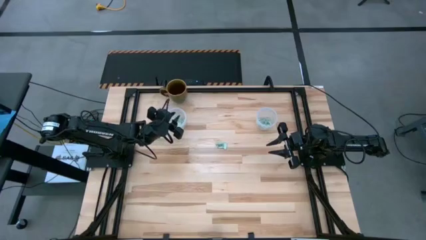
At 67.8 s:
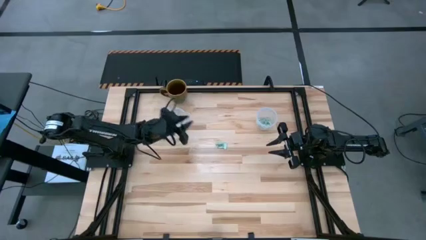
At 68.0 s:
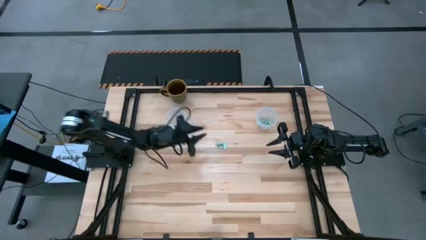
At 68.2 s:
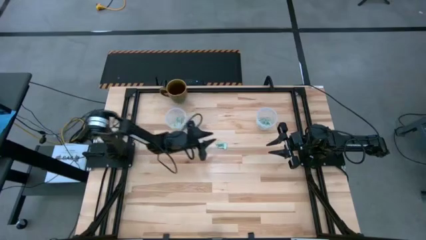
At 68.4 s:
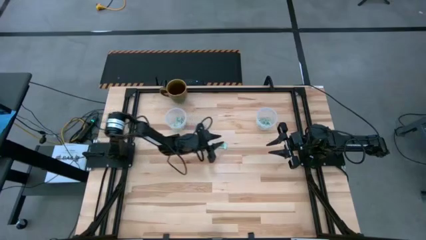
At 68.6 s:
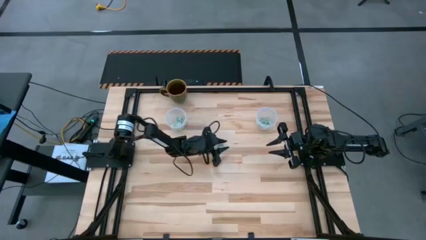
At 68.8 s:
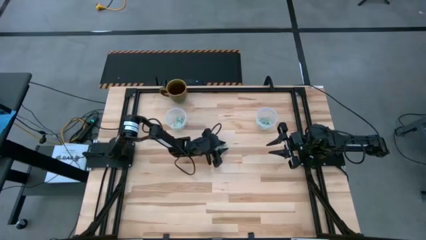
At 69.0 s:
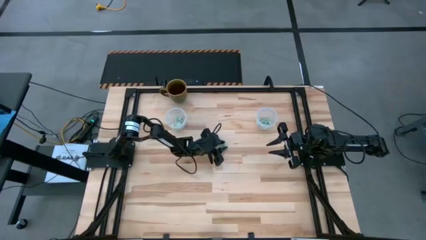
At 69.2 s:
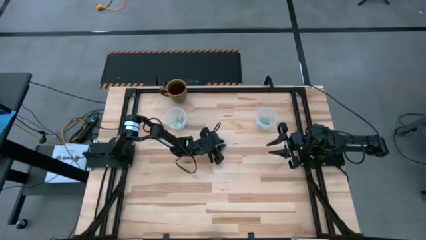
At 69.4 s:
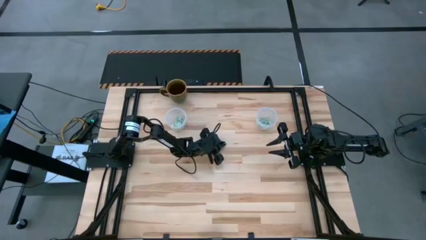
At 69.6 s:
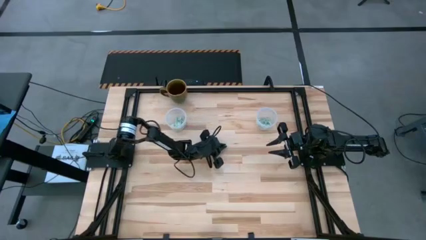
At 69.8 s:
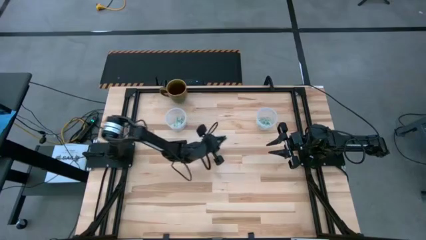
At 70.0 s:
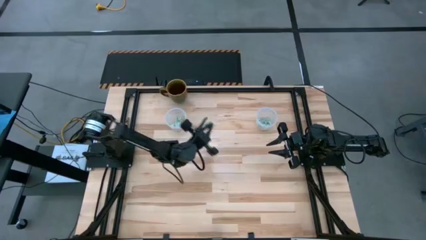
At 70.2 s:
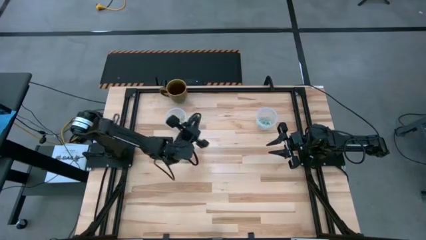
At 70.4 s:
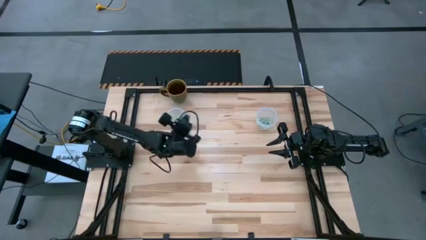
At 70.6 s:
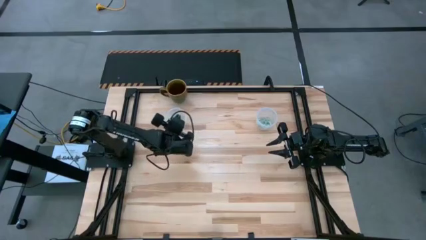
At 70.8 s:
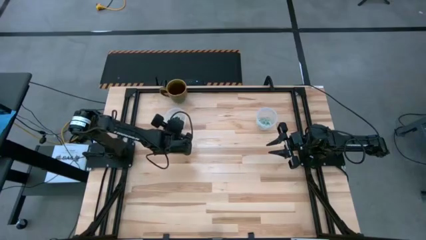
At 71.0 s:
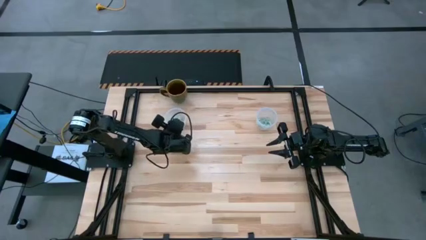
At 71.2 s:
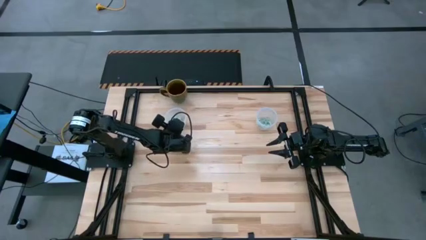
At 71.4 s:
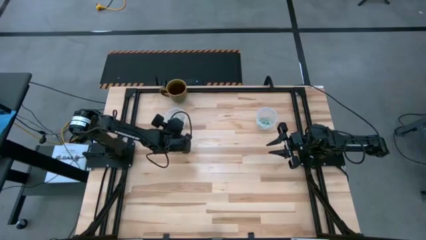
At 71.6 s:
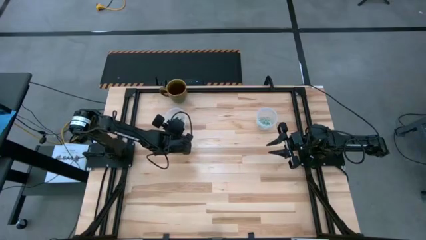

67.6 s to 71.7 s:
Task: Pick and place items into bin
Put the stevia packet into the left transparent bin

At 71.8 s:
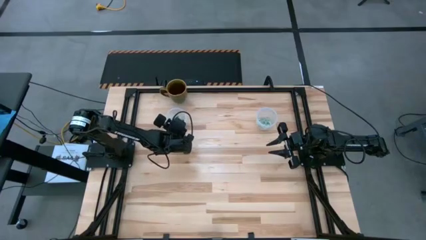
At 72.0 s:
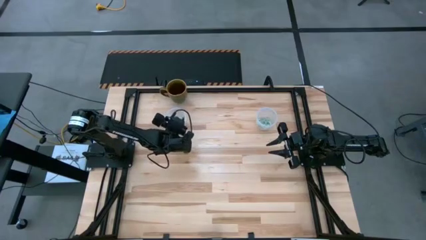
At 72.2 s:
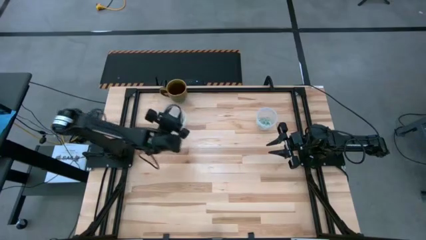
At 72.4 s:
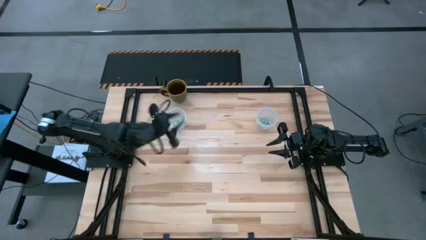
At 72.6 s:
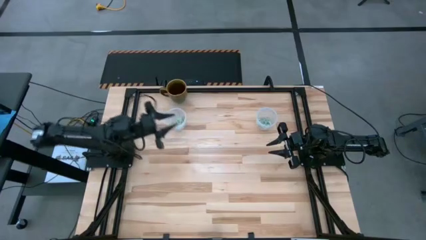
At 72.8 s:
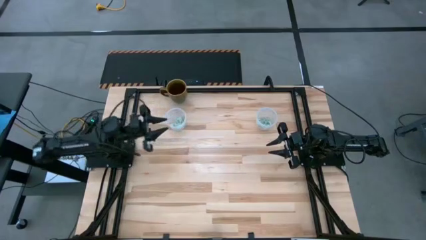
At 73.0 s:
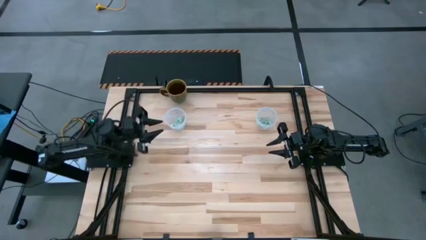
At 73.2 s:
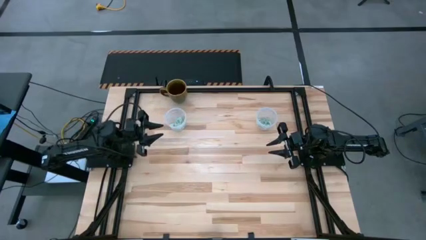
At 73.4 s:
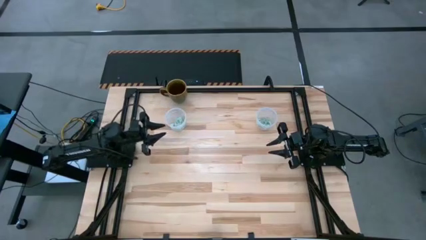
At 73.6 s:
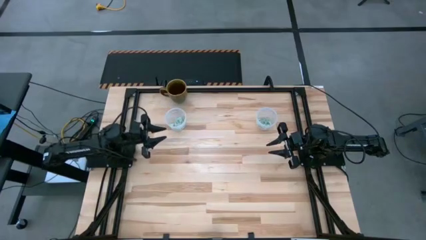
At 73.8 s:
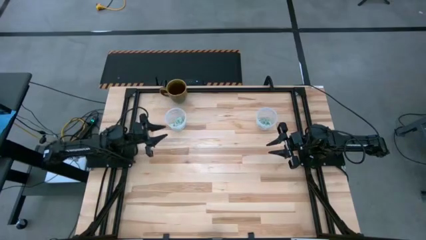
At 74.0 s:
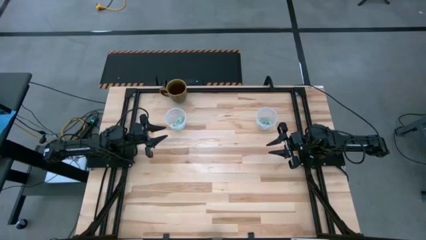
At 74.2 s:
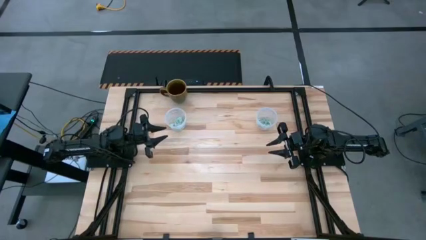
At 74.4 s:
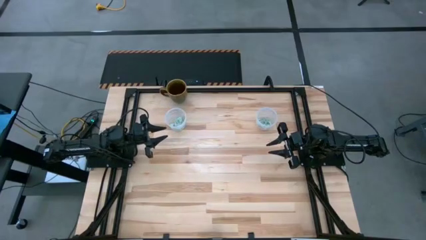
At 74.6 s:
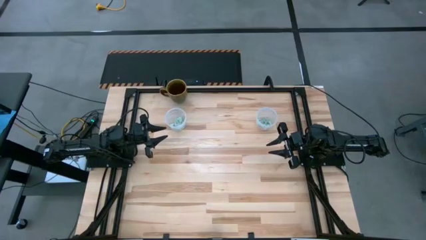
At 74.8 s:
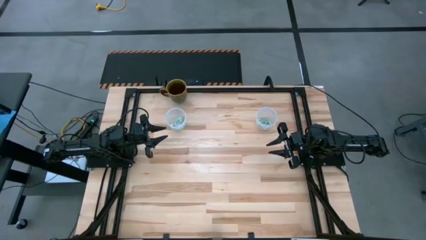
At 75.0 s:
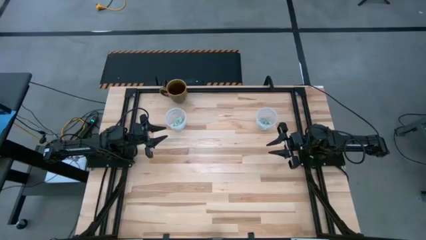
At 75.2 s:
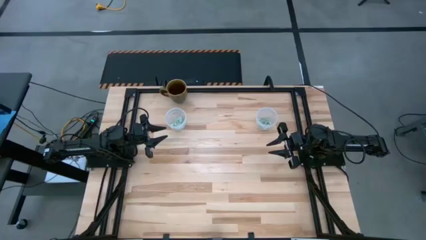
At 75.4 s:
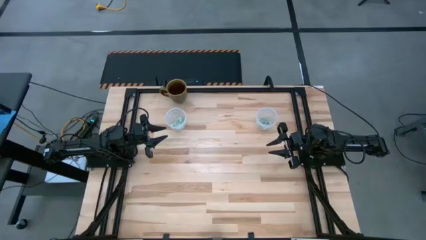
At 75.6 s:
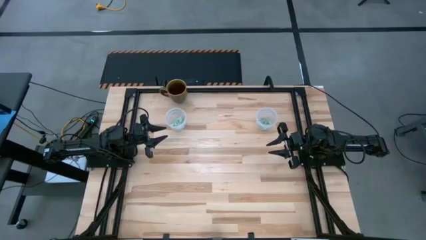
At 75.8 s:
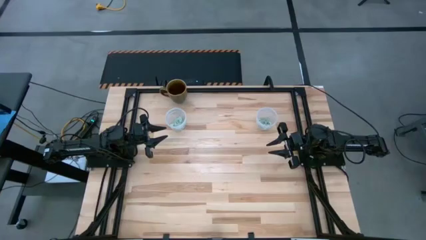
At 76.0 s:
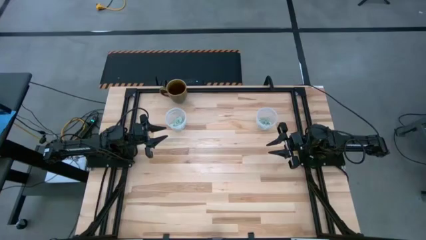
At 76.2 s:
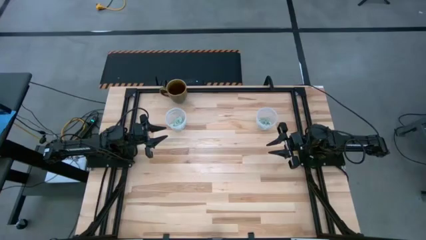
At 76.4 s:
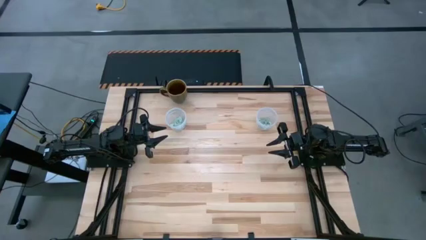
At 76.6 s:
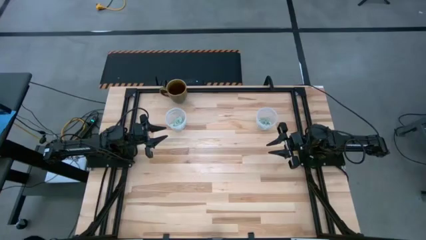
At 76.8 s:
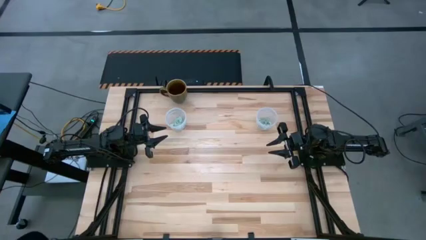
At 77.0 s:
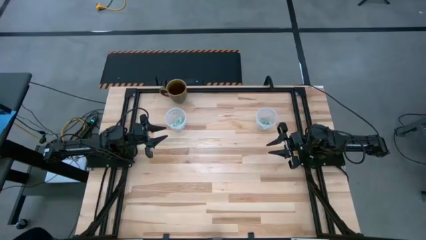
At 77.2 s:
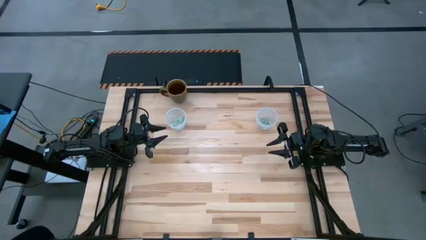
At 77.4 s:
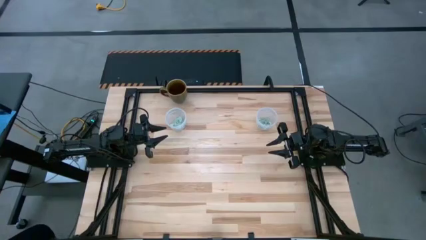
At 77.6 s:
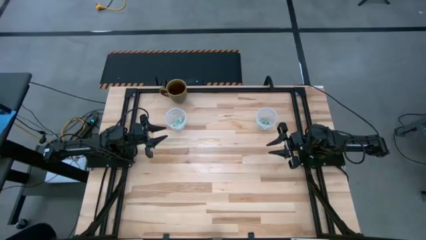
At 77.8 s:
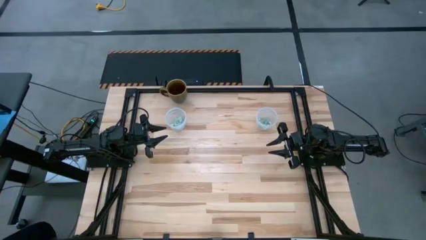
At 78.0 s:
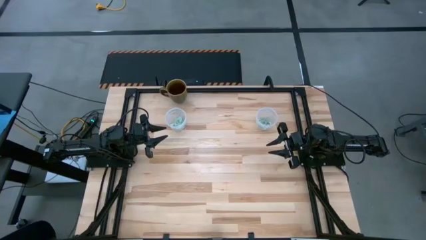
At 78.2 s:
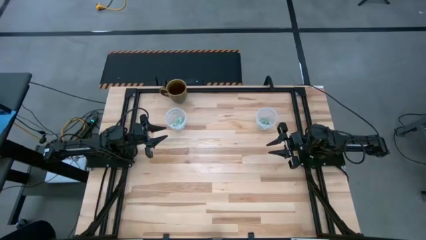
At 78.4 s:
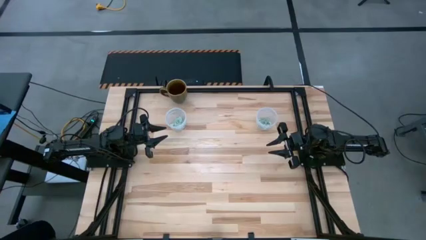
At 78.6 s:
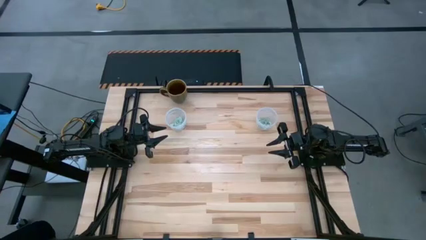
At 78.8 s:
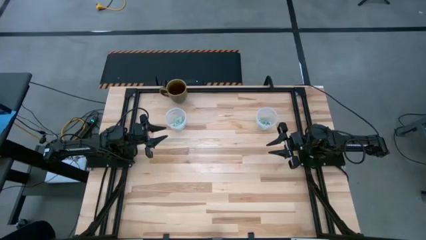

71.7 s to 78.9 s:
Return to Home Position
